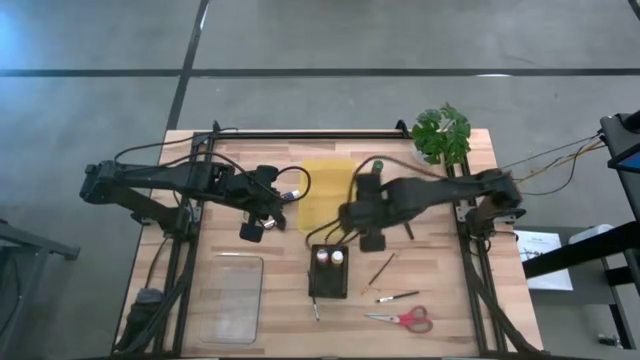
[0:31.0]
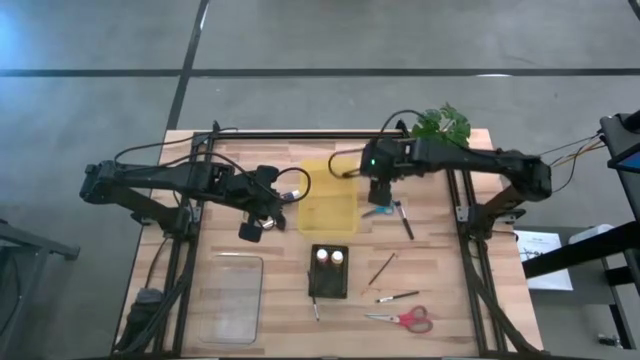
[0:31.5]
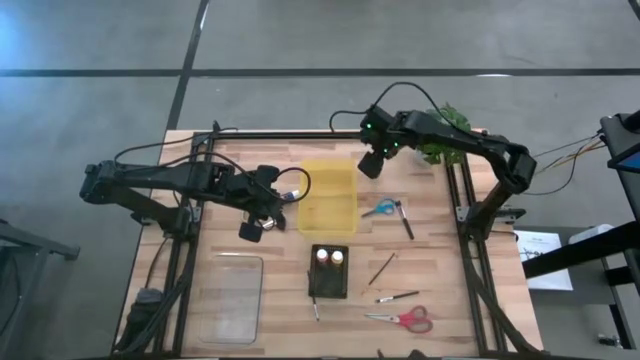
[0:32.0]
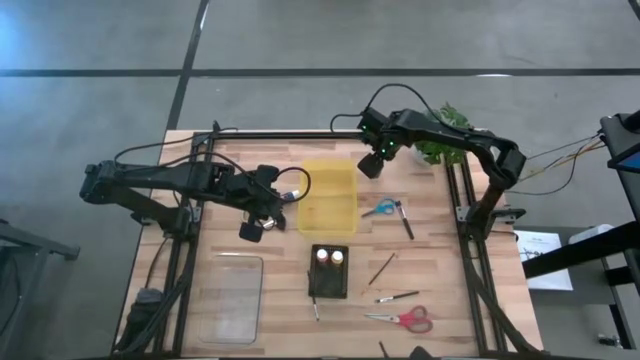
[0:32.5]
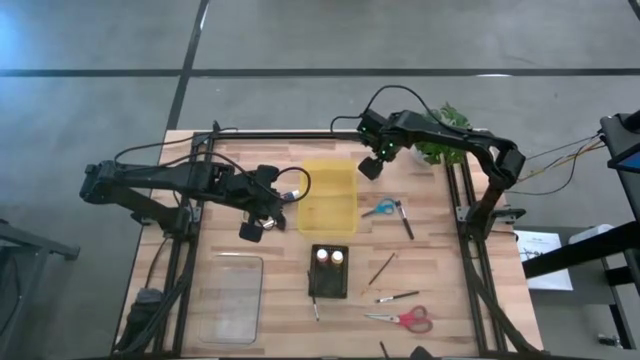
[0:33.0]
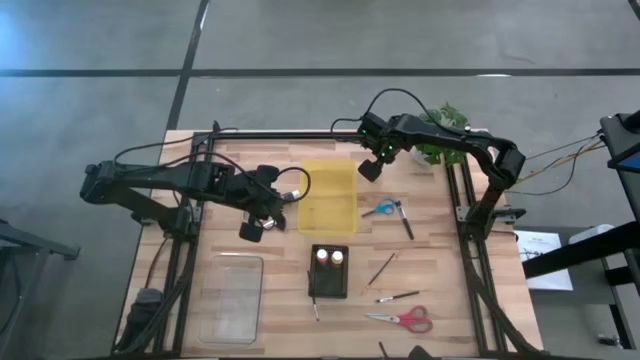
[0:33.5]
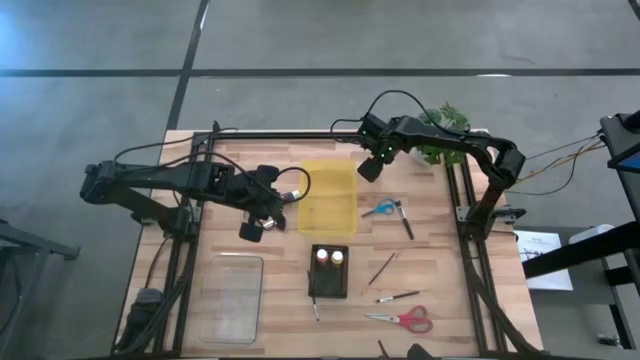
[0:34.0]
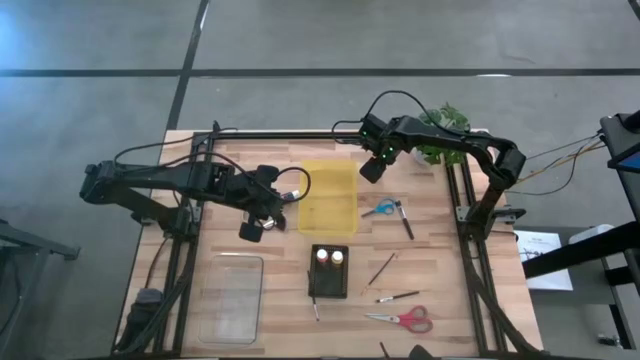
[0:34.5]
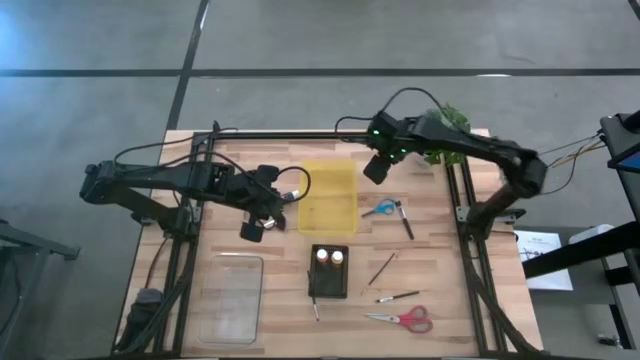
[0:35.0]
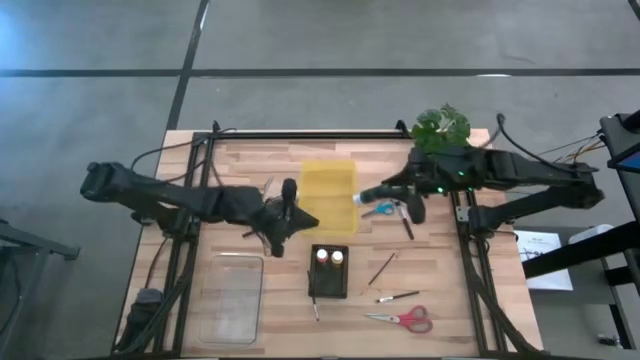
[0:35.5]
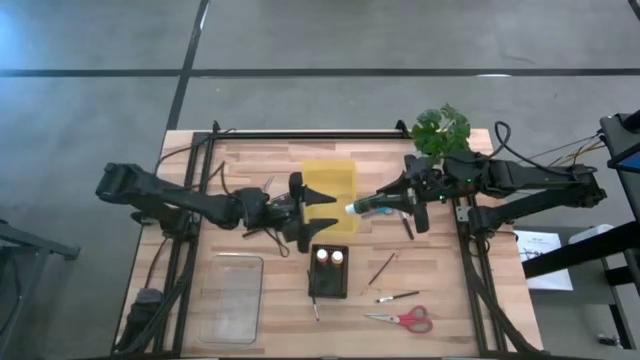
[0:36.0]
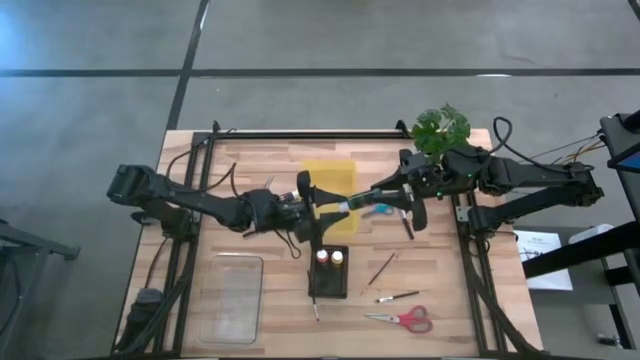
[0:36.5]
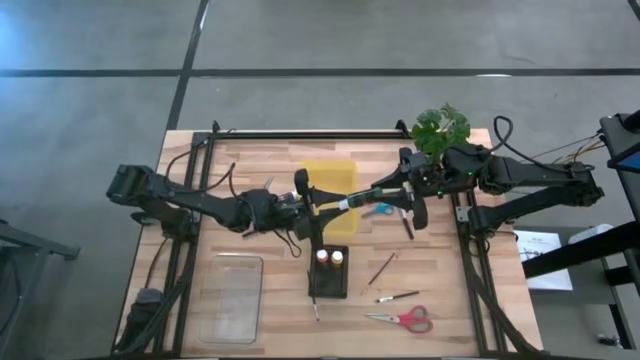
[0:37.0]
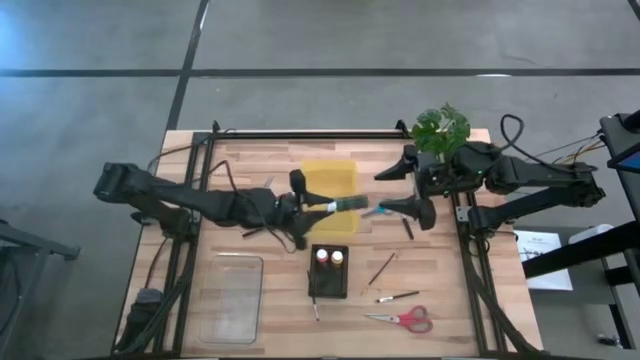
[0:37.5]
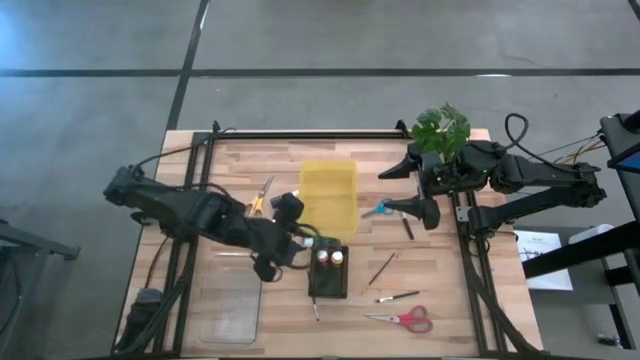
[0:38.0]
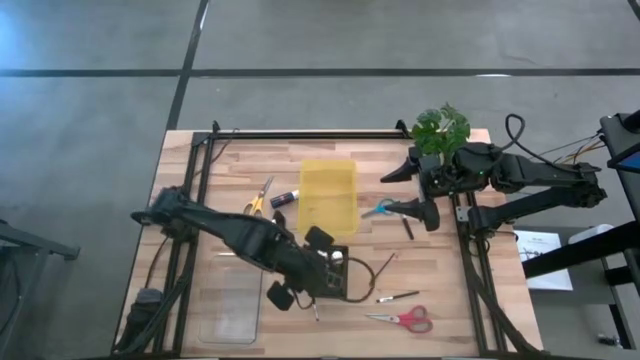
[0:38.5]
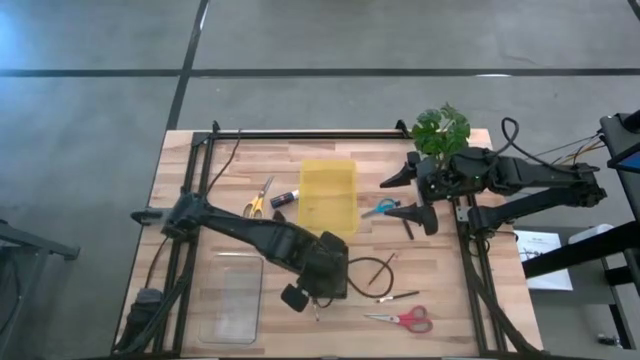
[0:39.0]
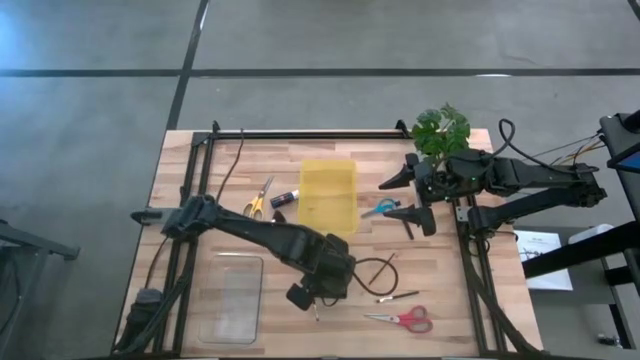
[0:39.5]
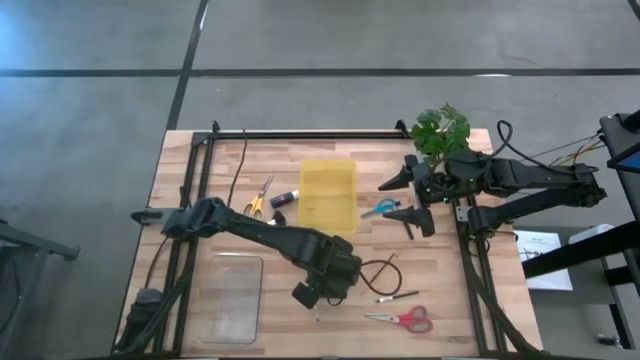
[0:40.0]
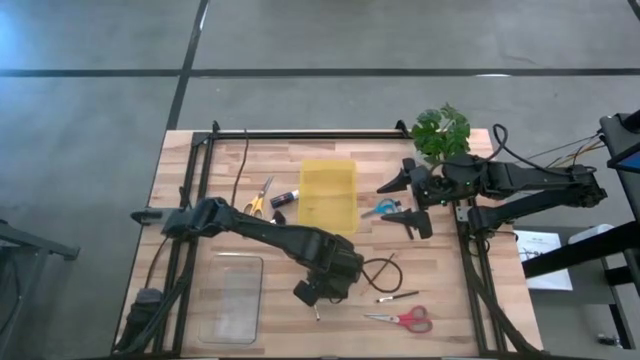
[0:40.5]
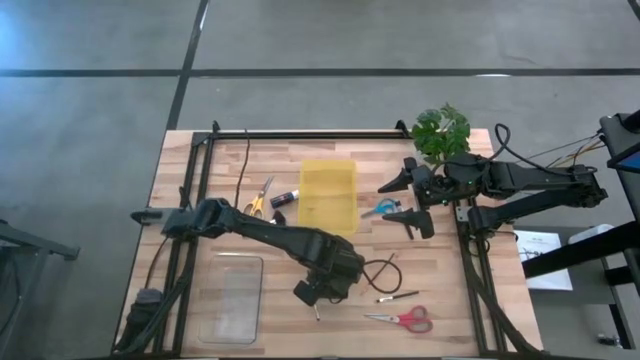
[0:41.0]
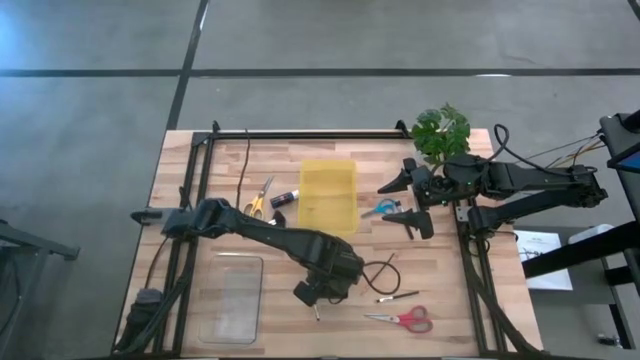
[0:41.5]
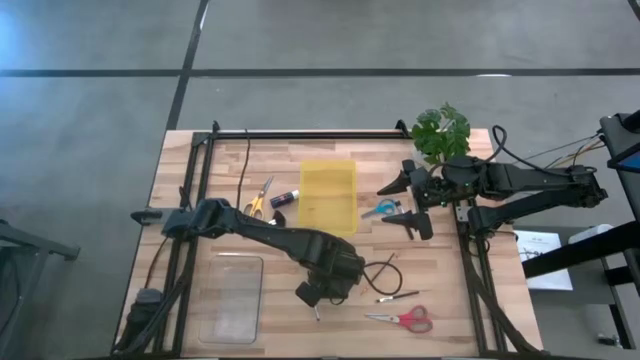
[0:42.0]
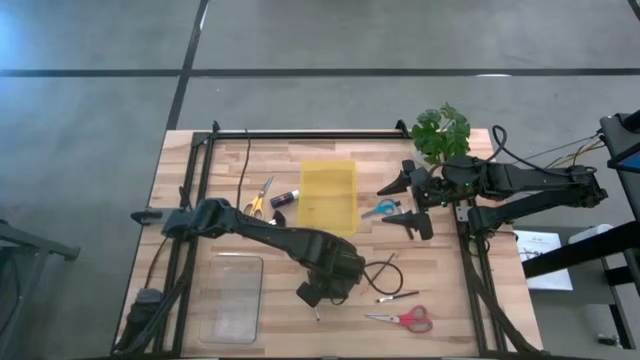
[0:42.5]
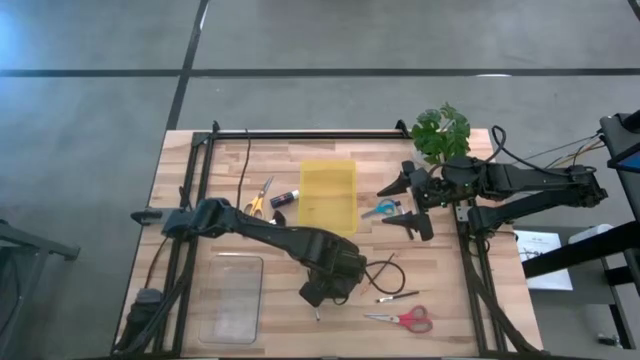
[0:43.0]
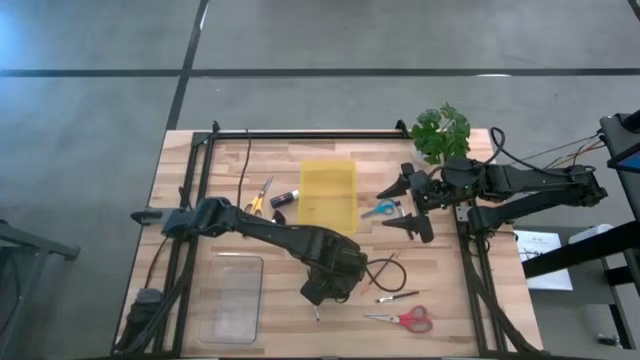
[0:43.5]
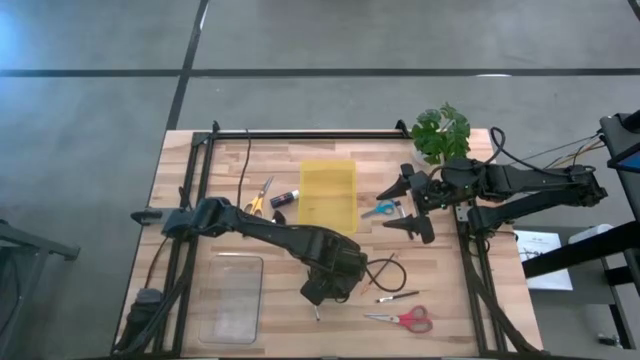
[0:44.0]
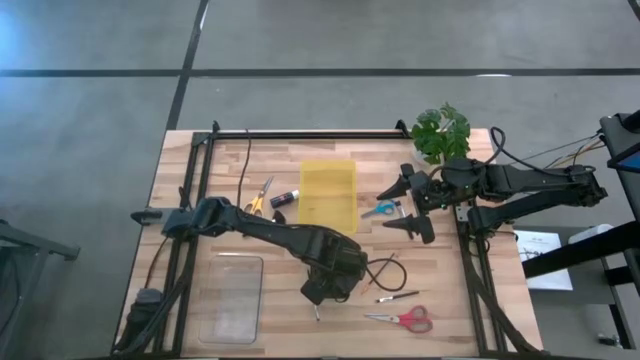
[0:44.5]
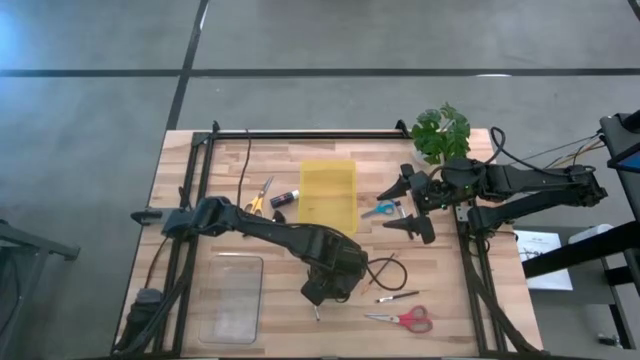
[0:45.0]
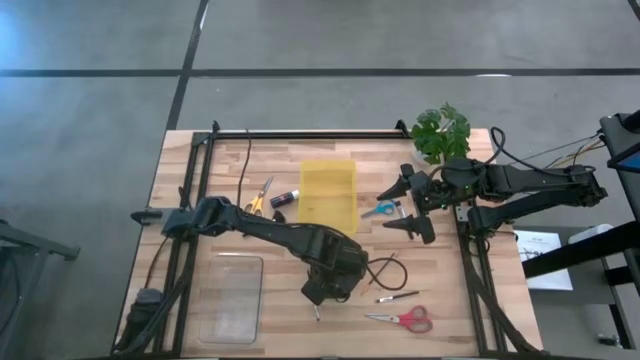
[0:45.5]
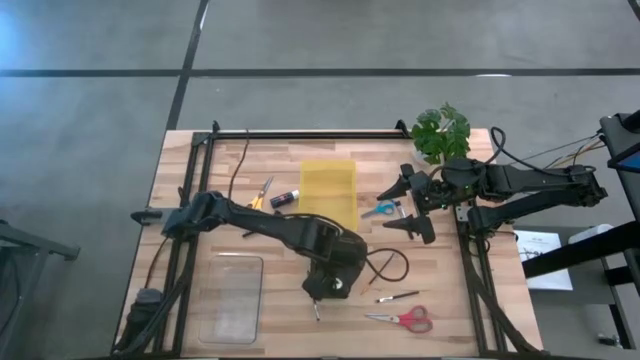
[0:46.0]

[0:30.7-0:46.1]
Task: Pick & Place Paint Supplies
Put the green paint bottle into the black bin

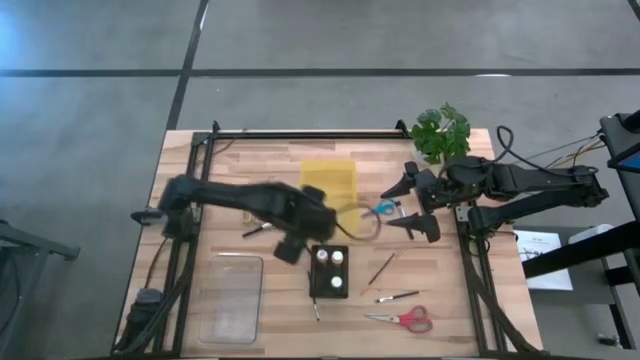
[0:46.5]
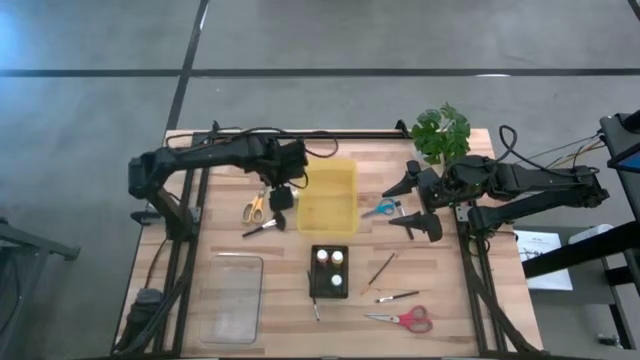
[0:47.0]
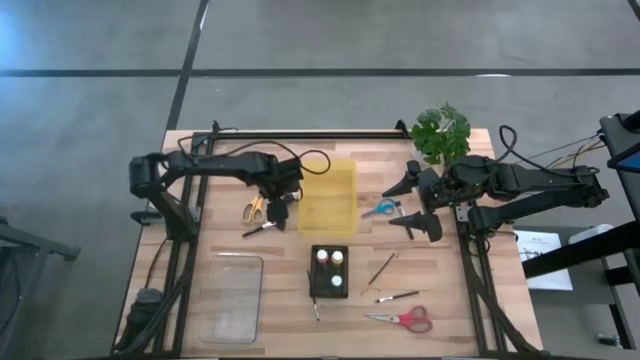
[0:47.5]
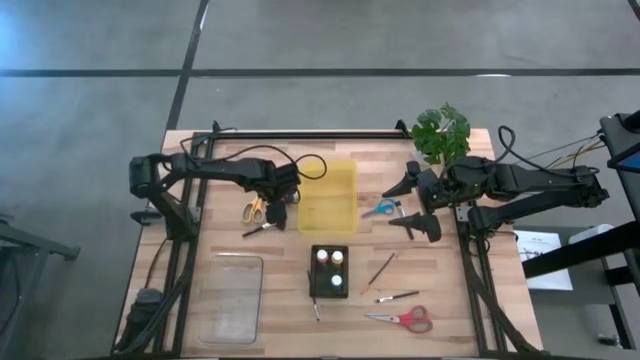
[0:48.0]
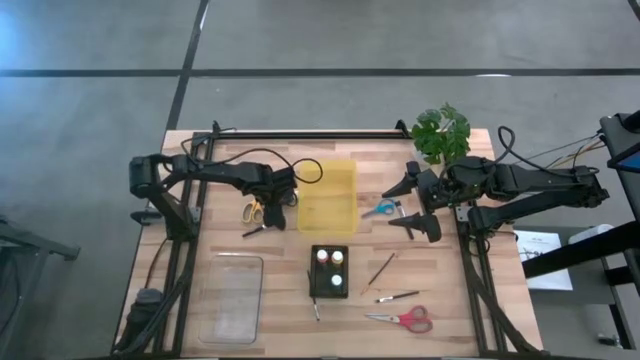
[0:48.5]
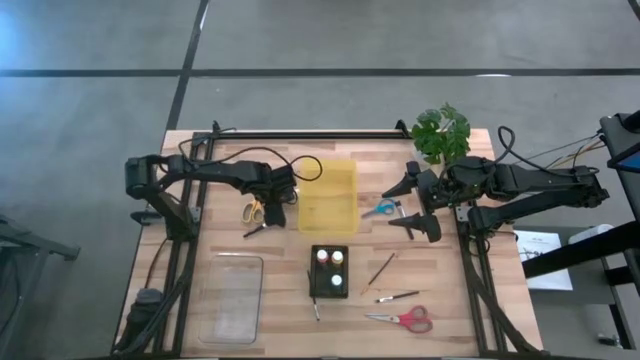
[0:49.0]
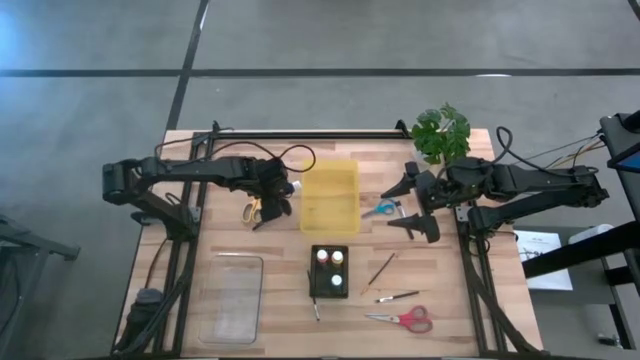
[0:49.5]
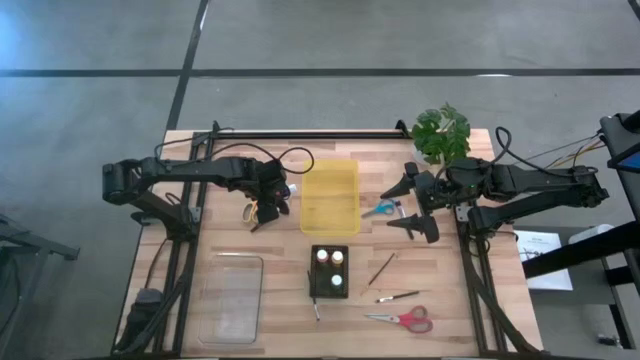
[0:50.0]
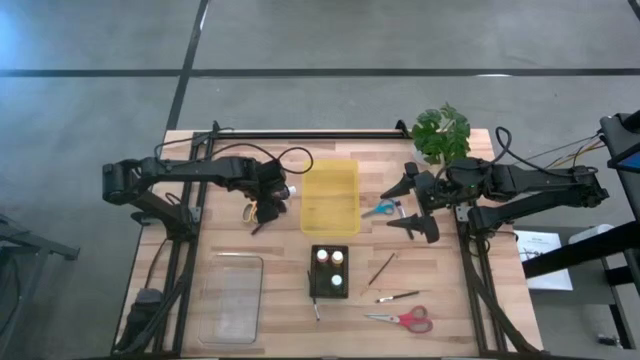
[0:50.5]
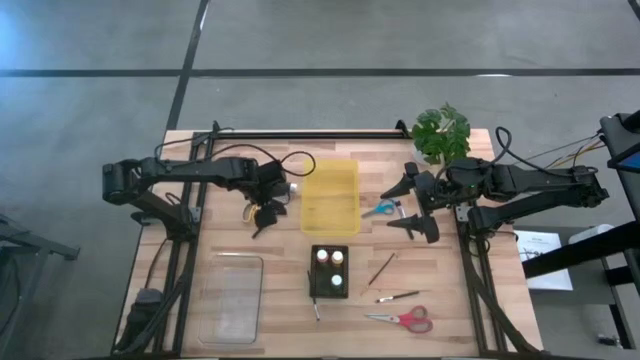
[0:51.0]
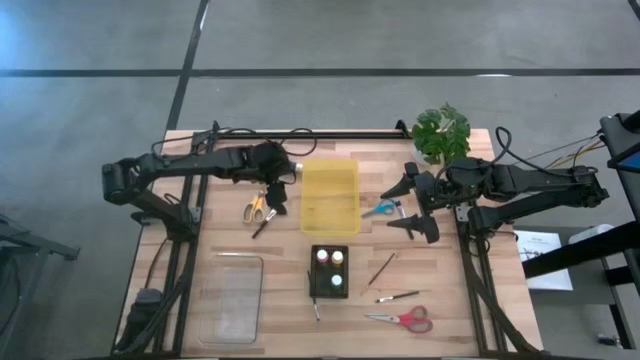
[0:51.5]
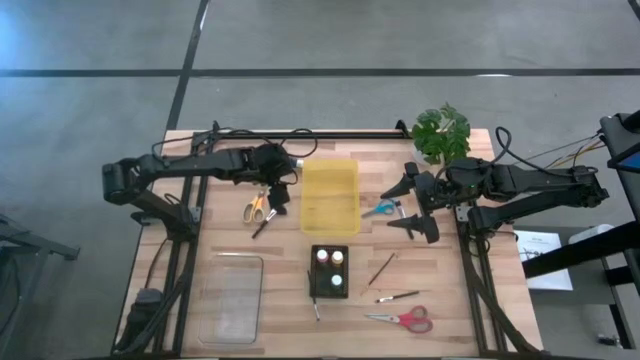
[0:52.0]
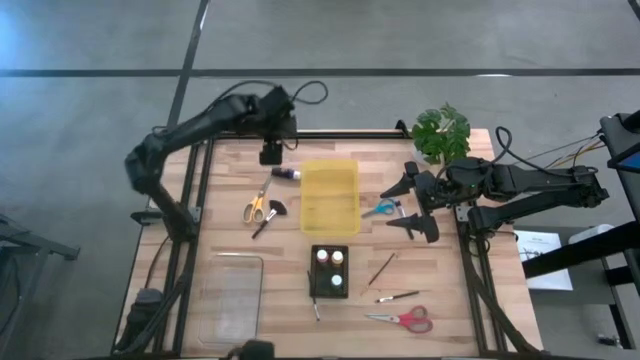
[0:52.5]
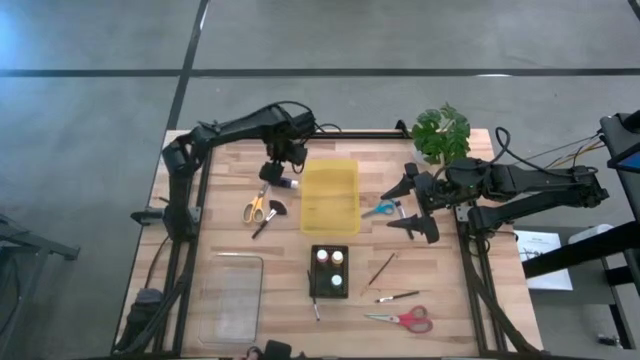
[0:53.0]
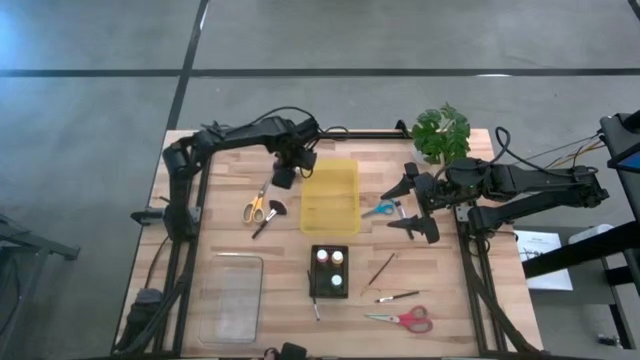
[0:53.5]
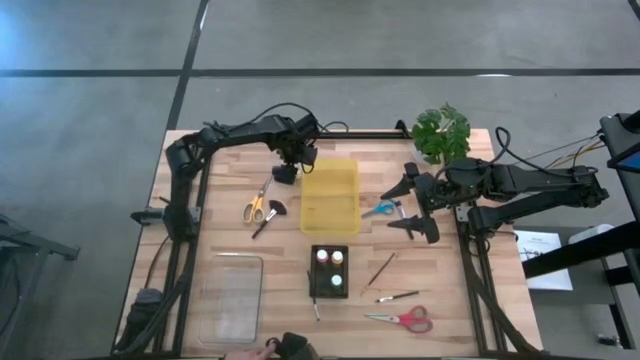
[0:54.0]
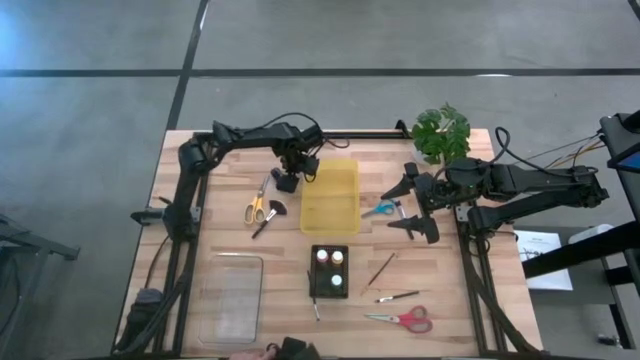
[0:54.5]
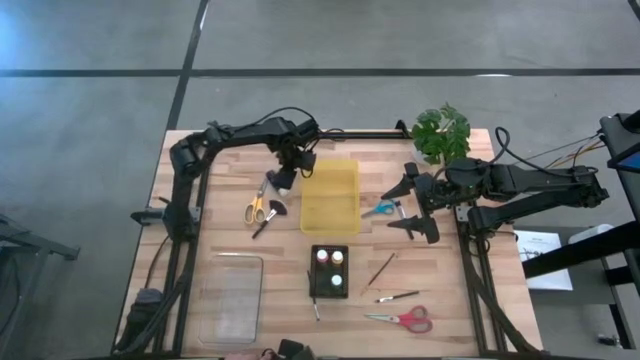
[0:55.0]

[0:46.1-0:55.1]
Put the purple paint bottle into the black bin
